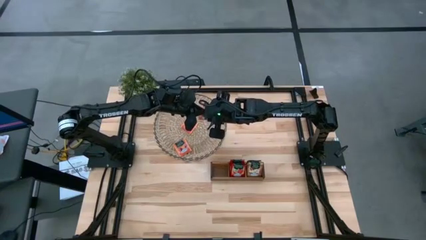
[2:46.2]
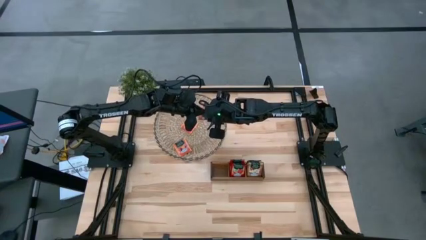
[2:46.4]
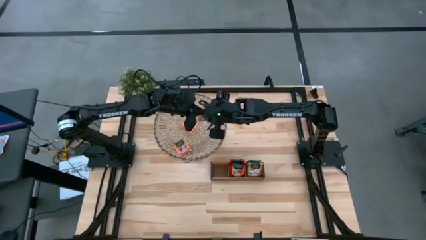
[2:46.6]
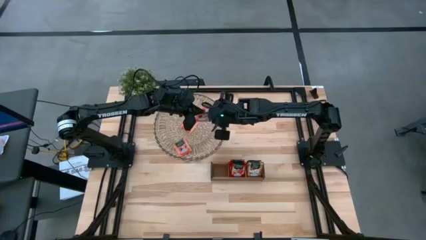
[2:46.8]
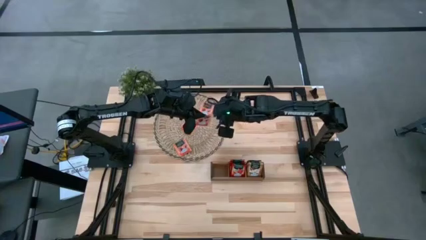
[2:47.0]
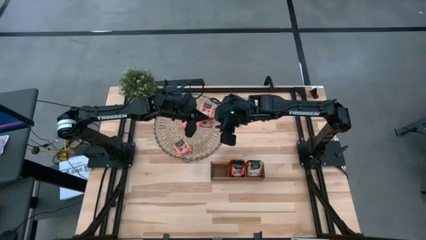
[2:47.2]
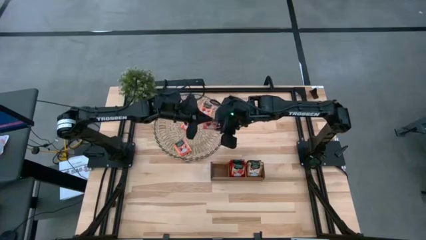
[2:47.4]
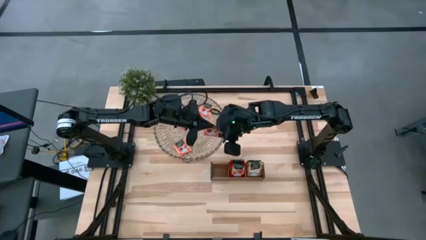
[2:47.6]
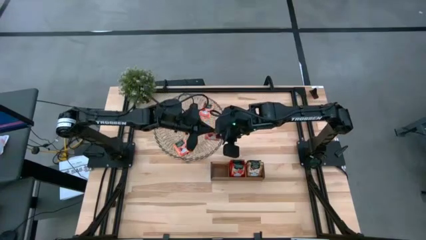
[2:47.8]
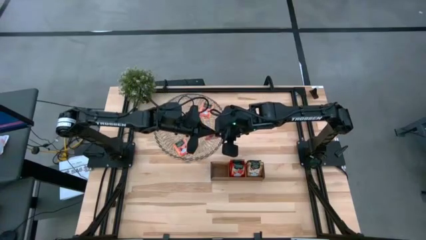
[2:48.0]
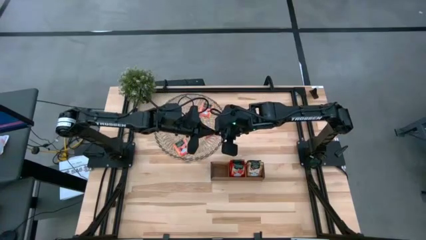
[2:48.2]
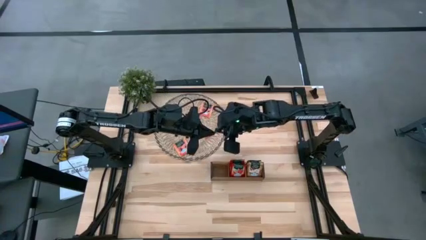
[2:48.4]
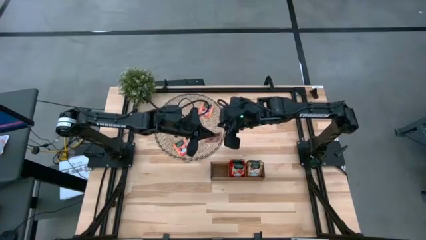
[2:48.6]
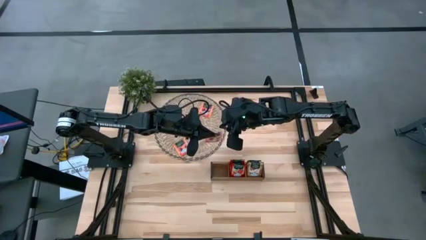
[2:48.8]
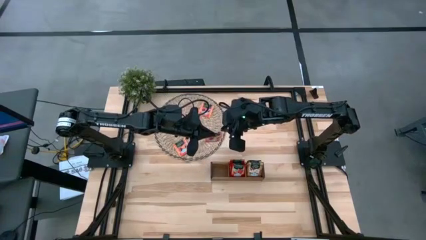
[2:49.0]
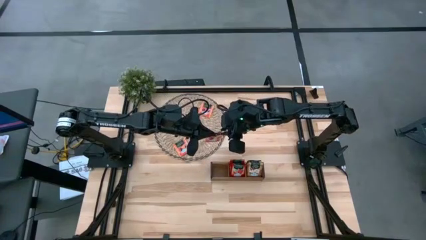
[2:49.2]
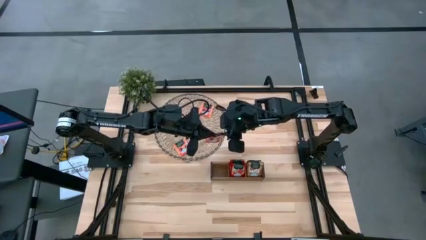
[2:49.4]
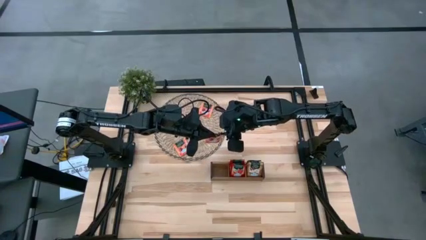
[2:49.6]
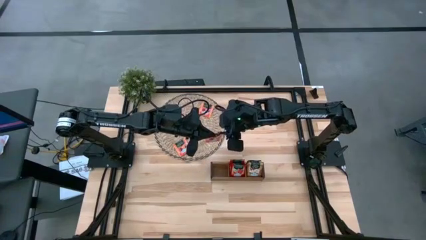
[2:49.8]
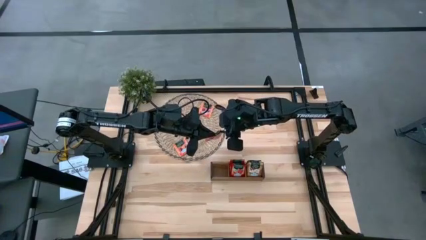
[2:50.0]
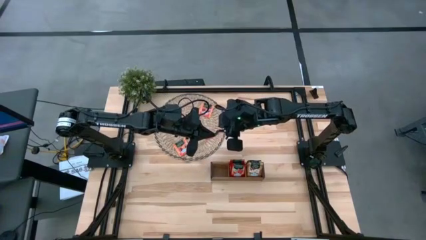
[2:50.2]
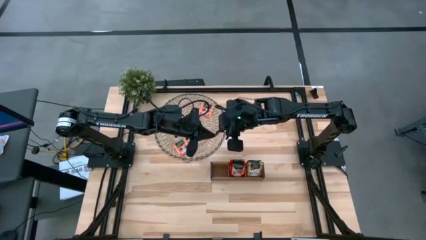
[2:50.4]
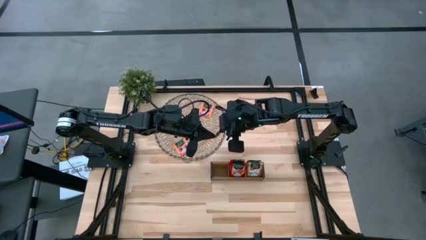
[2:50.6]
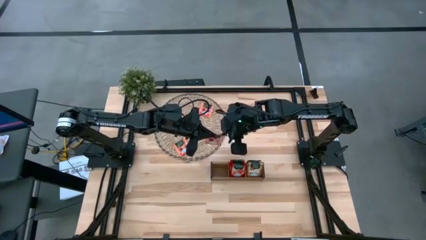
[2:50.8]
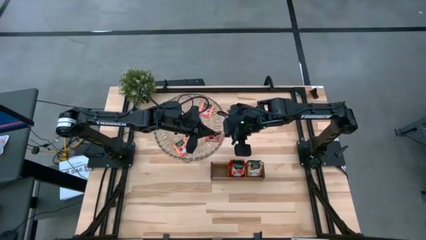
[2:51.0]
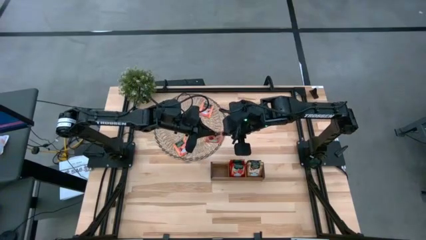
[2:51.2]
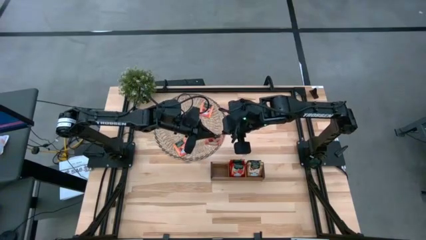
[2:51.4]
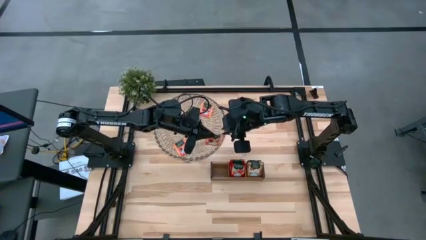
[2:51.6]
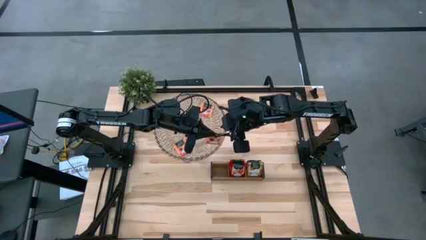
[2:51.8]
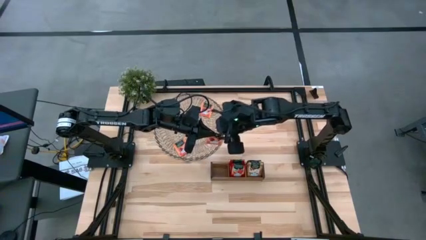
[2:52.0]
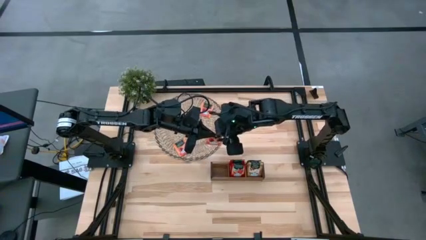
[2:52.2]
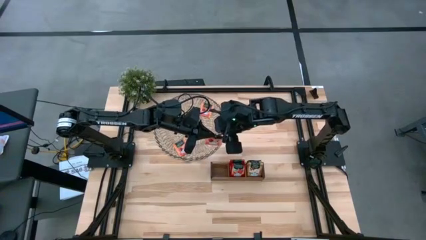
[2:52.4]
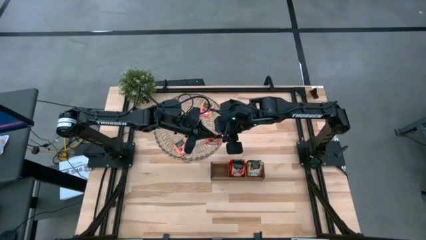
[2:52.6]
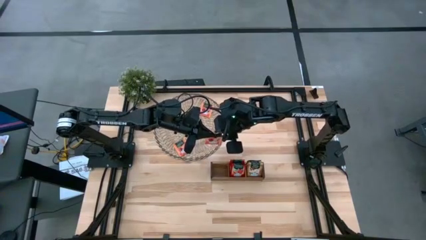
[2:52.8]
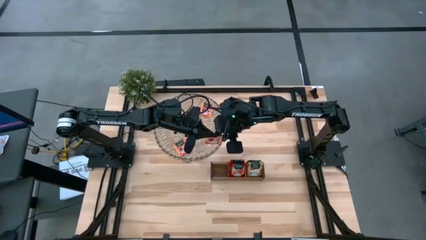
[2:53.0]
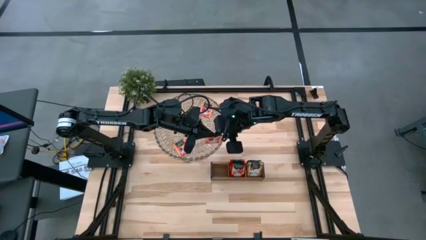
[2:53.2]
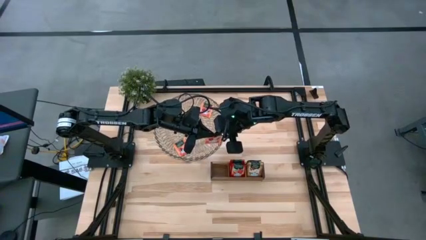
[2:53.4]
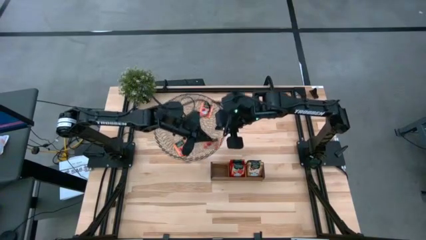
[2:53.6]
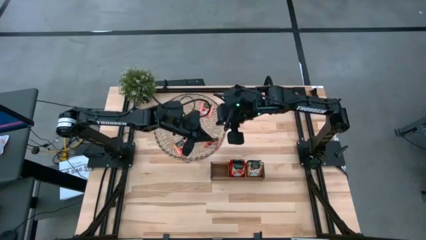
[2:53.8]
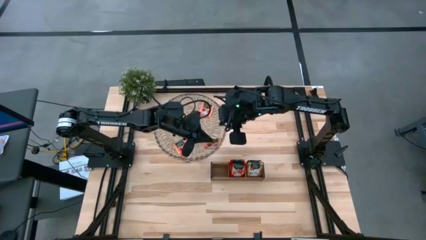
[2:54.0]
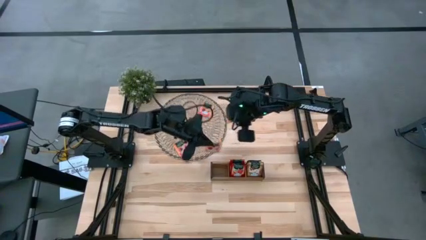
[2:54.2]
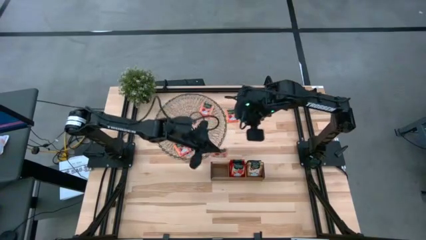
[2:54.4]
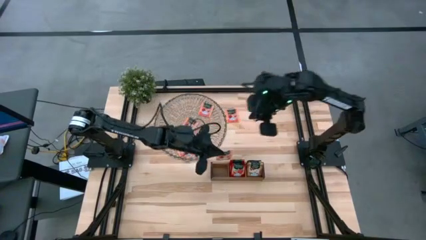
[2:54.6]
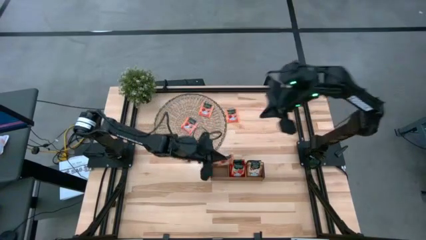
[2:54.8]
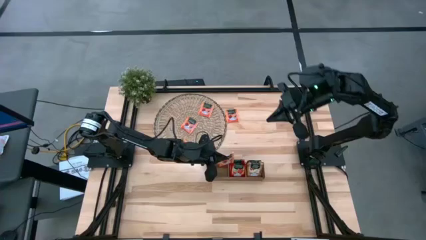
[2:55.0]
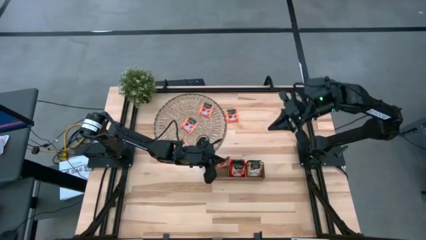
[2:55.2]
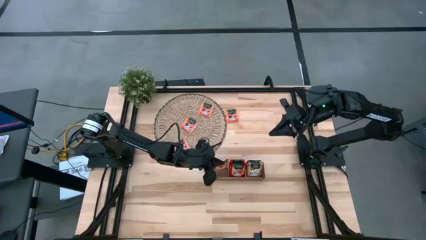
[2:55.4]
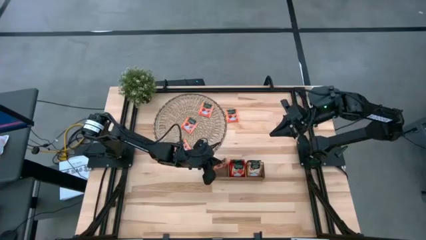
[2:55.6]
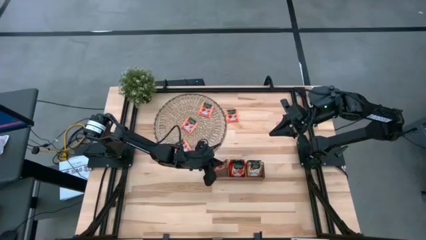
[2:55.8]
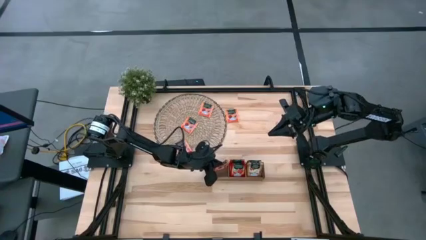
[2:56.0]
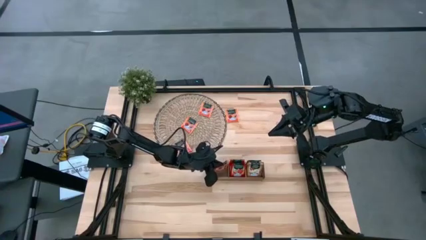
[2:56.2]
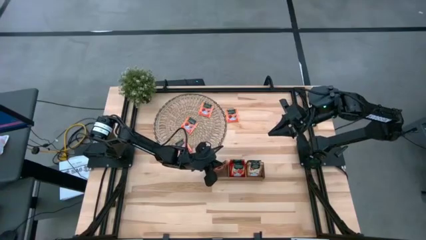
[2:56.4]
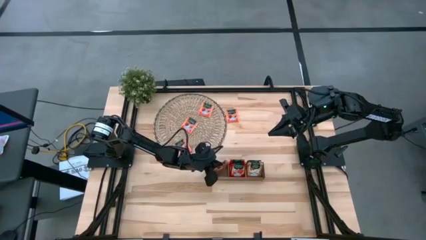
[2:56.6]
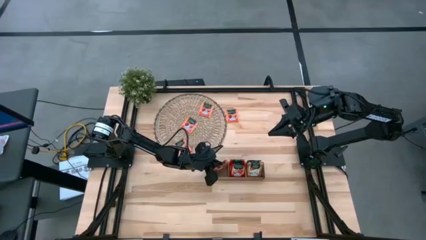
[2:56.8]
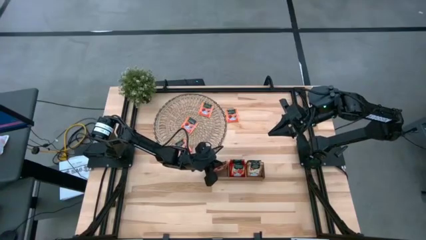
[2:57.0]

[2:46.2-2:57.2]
Task: Pick & Place Tea
Put the orange tea bag into the left slot of the wooden organizer

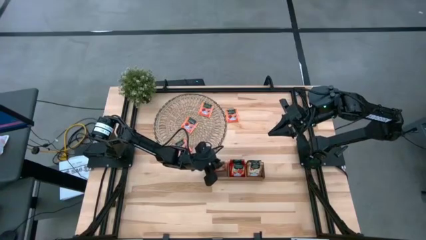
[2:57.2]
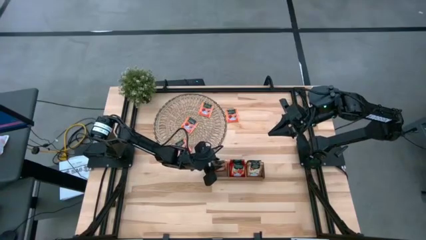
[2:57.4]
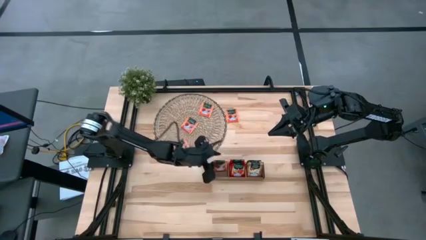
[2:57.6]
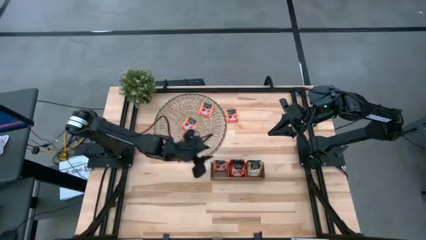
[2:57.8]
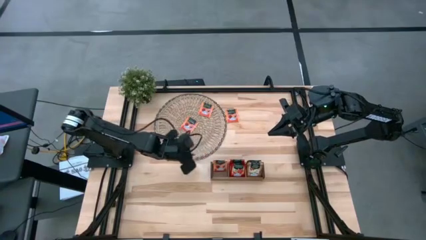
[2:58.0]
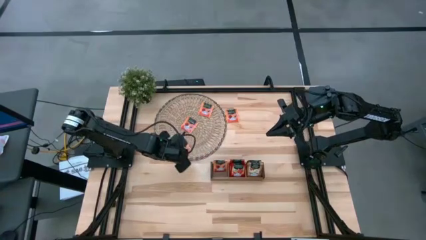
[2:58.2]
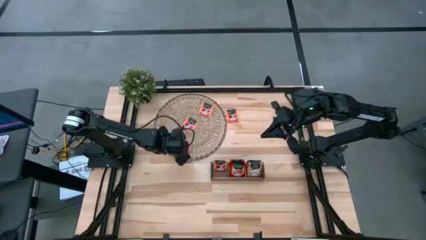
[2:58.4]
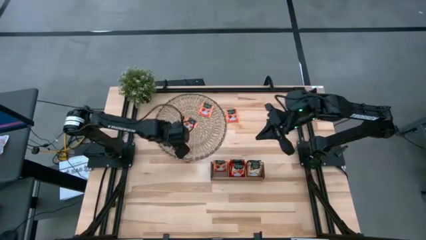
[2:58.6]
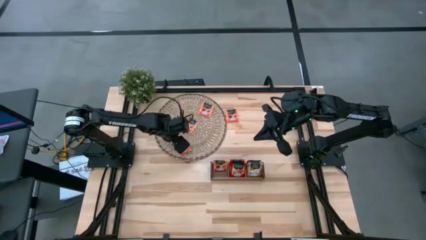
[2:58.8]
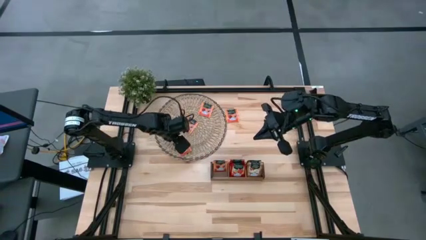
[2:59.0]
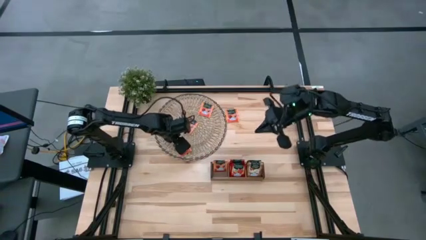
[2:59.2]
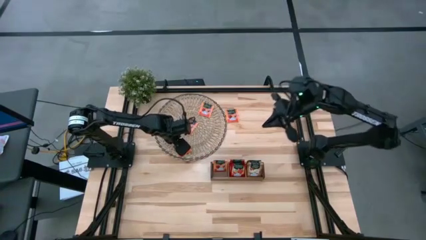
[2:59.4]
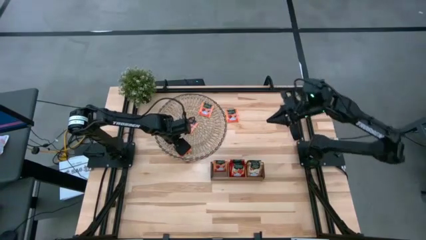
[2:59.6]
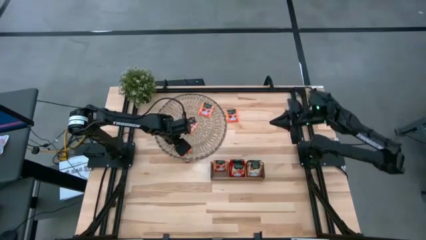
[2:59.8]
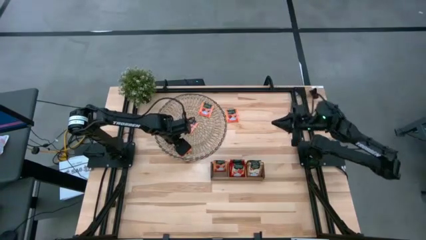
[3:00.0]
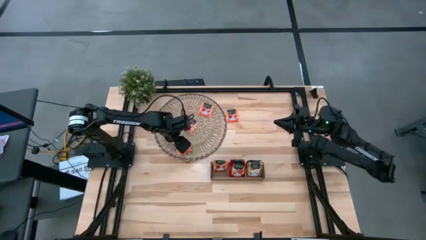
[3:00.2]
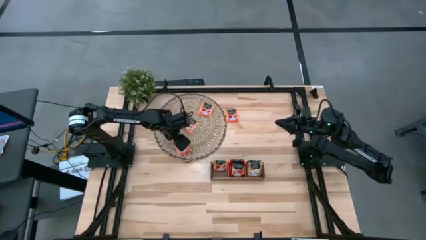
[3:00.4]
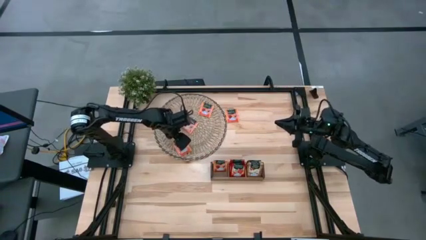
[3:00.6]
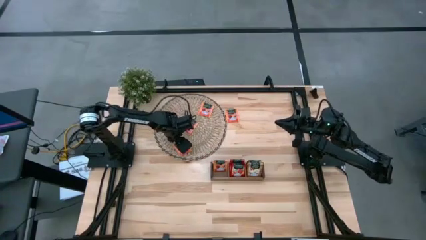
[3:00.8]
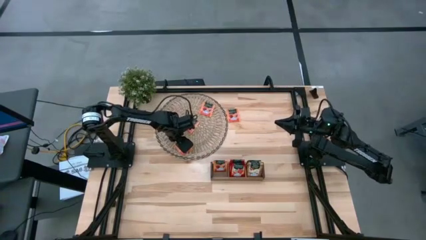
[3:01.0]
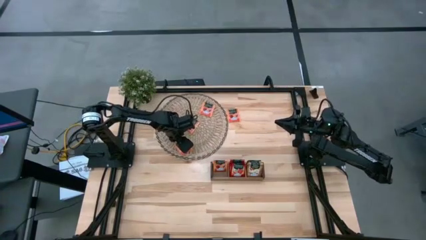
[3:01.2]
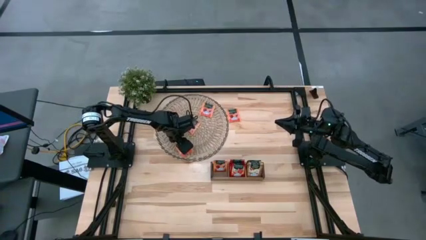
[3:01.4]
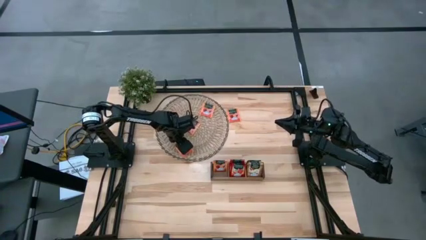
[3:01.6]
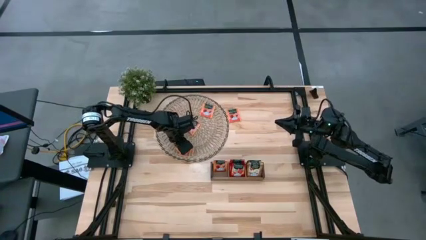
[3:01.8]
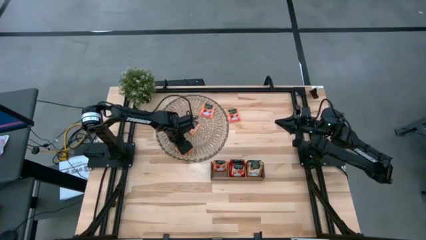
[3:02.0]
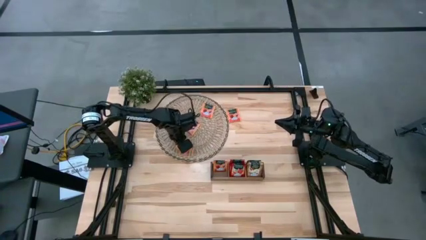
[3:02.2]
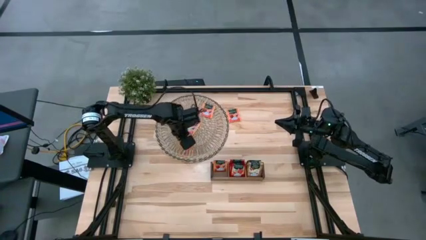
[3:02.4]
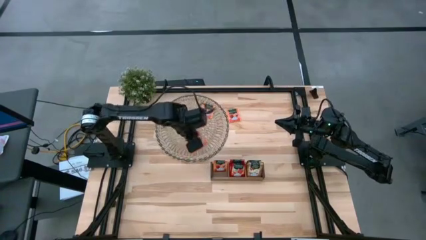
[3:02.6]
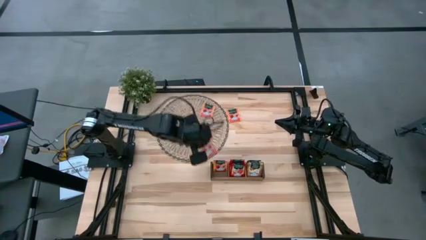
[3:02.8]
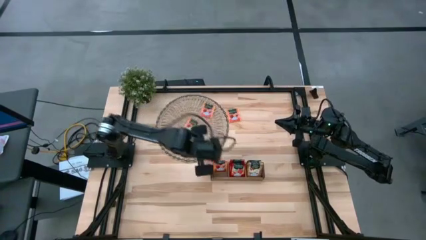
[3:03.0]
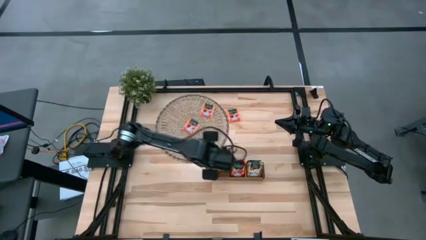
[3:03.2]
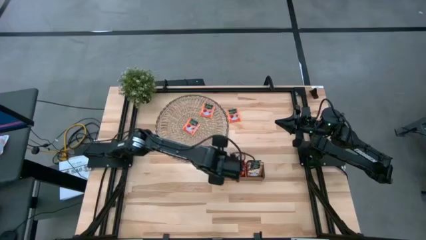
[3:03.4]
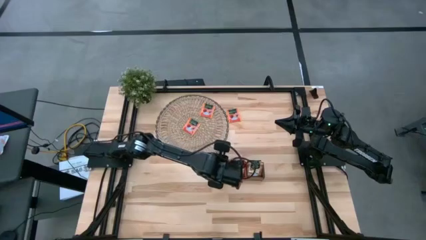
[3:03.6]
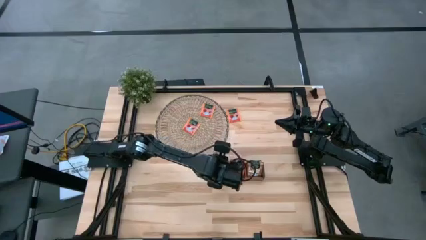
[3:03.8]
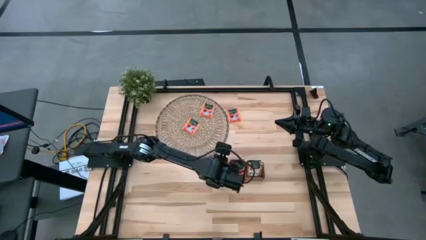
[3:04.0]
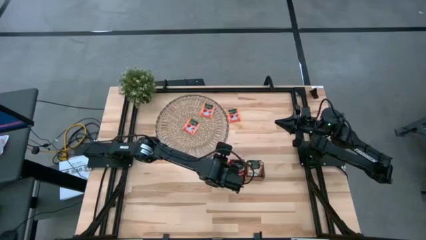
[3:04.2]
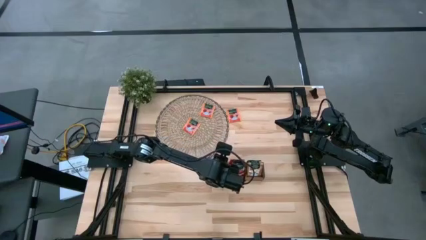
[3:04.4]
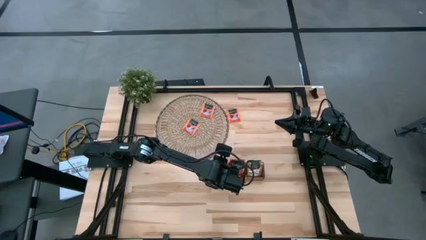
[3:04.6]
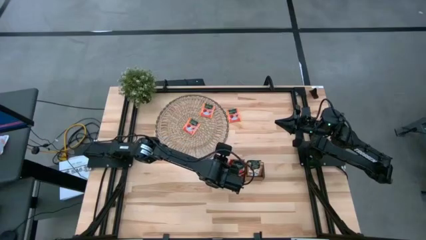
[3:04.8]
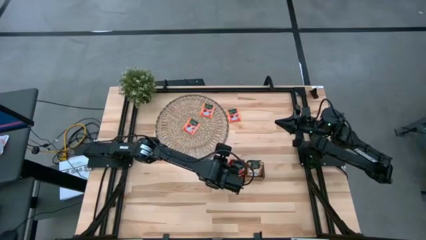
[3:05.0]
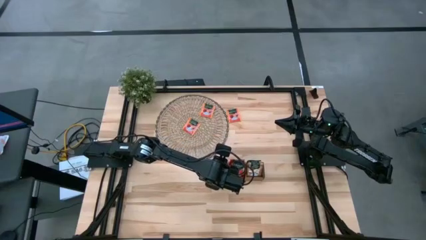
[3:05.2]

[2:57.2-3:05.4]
Put the orange tea bag into the left slot of the wooden organizer
